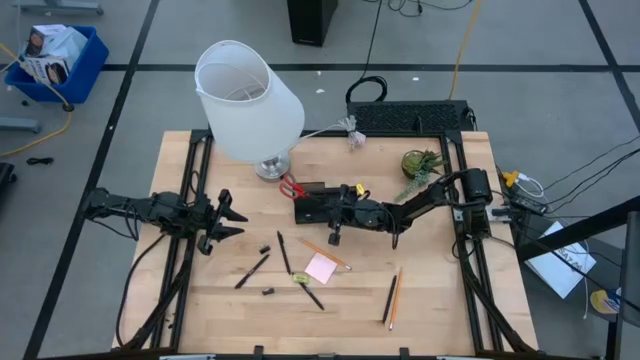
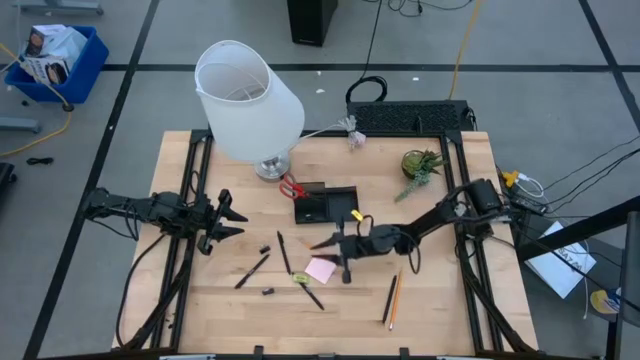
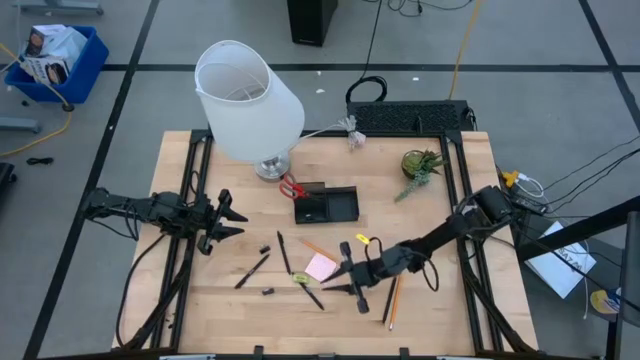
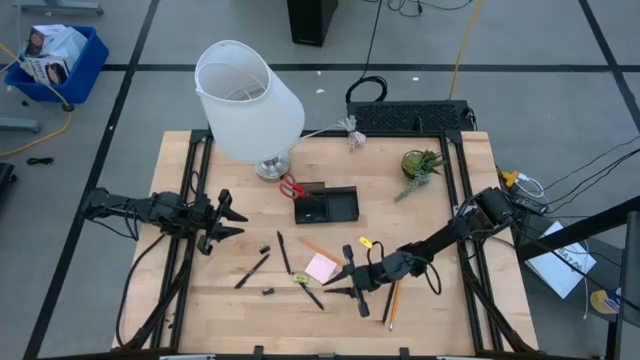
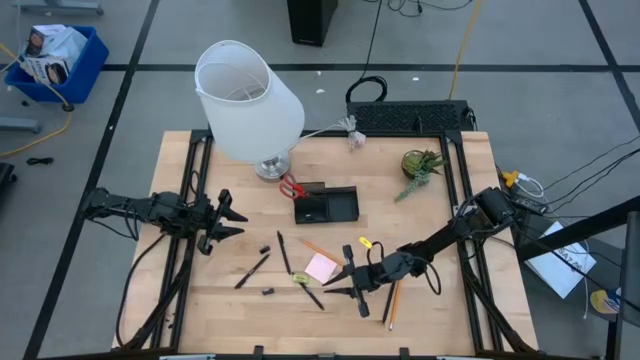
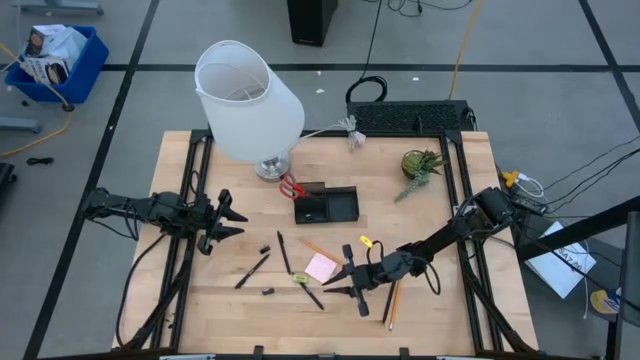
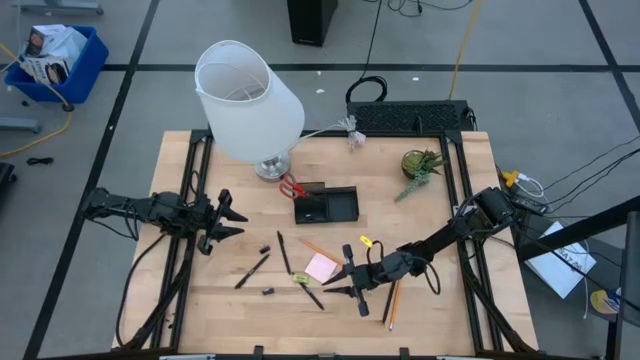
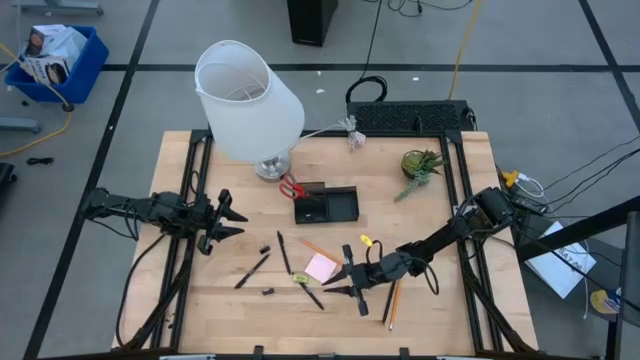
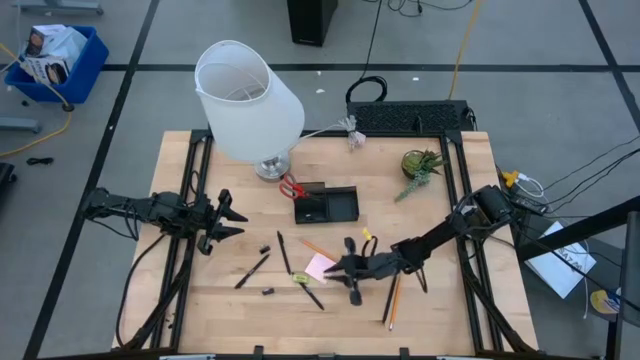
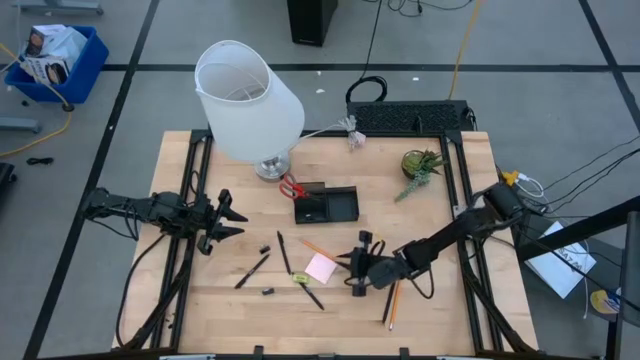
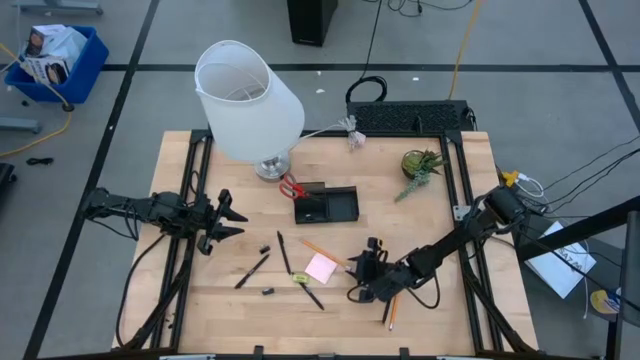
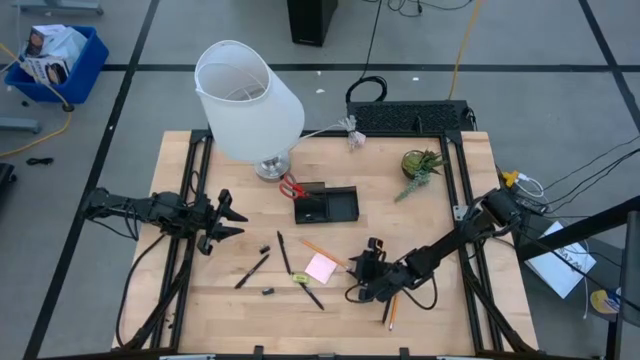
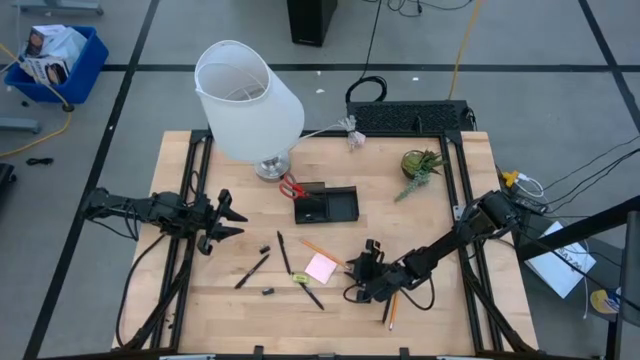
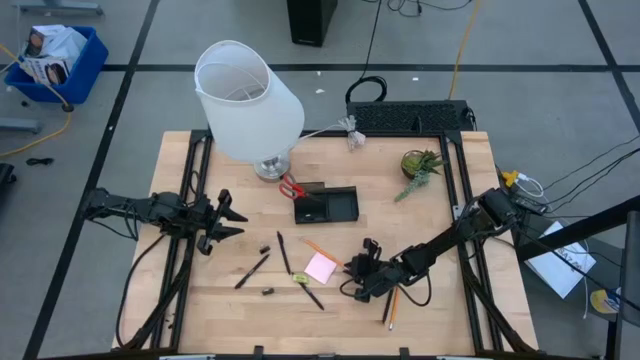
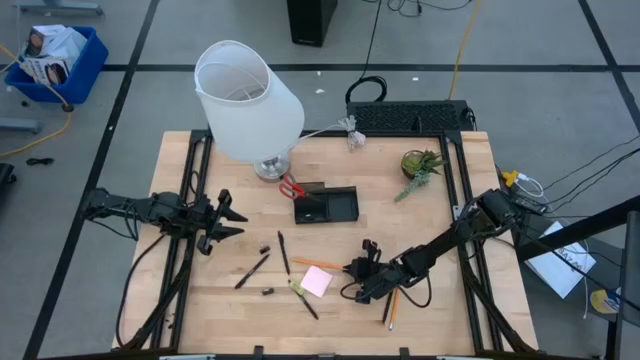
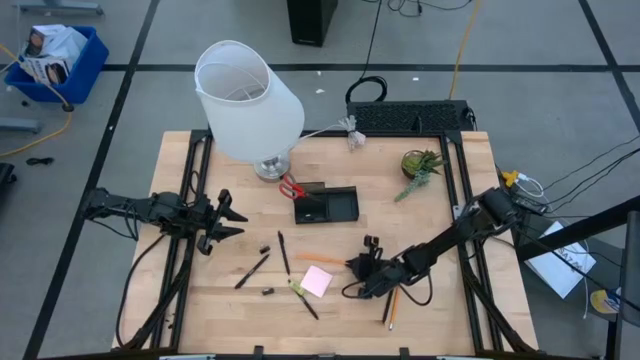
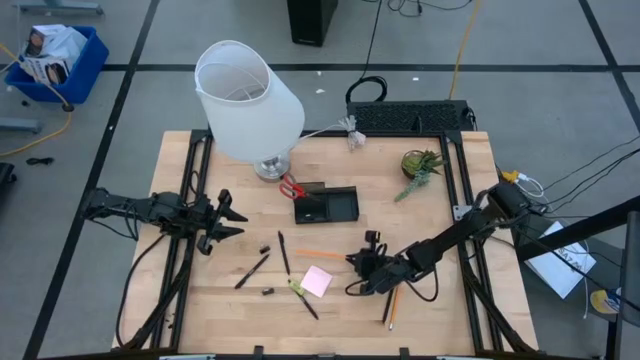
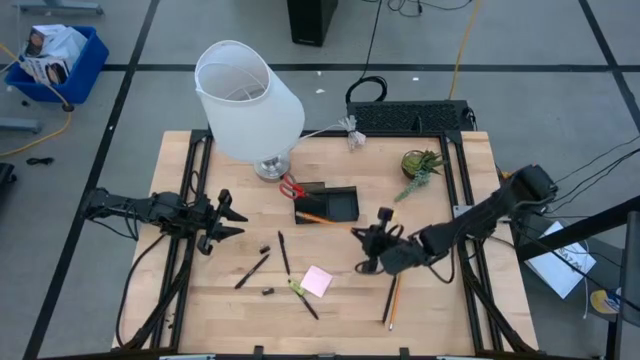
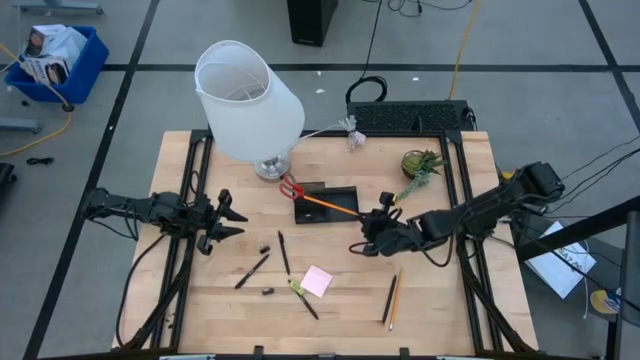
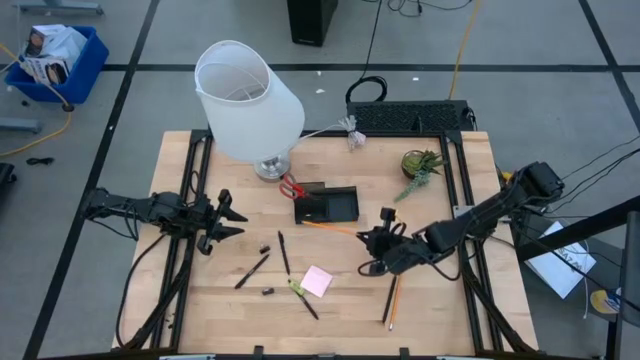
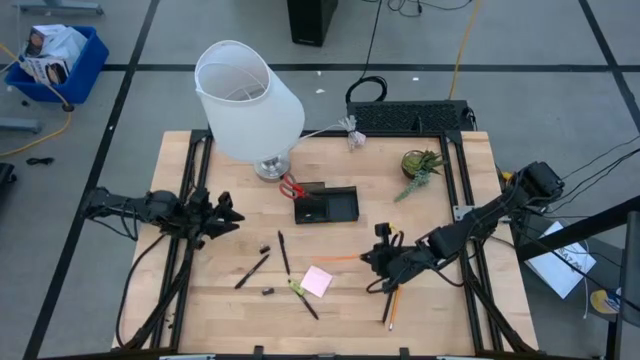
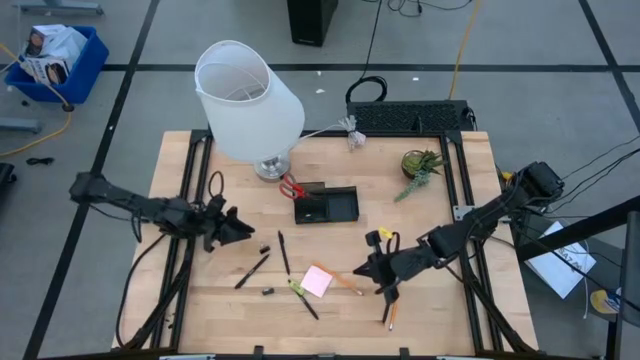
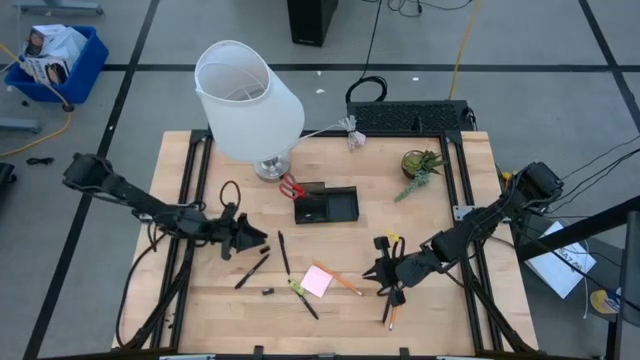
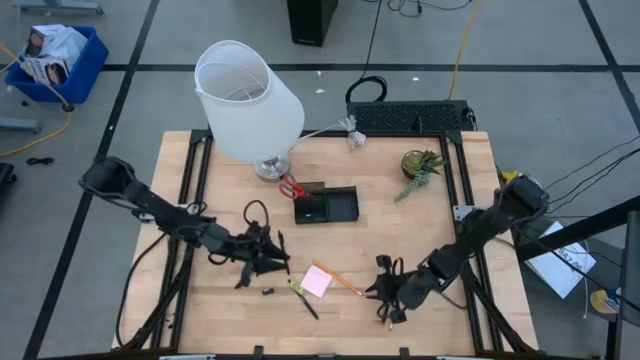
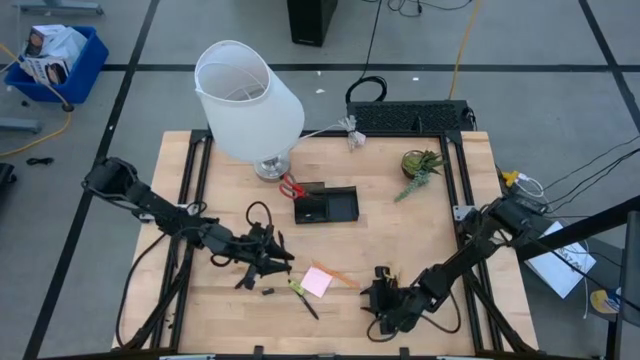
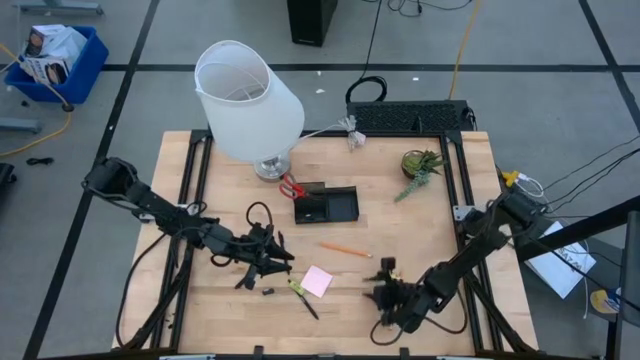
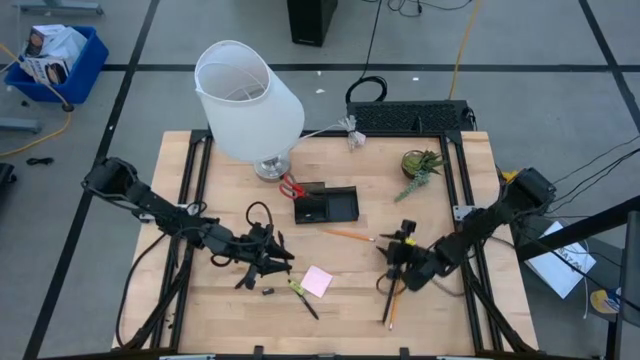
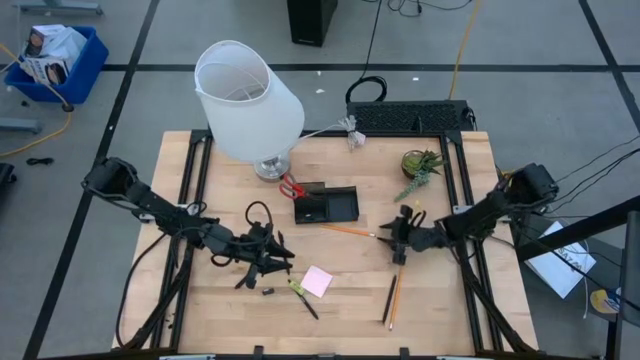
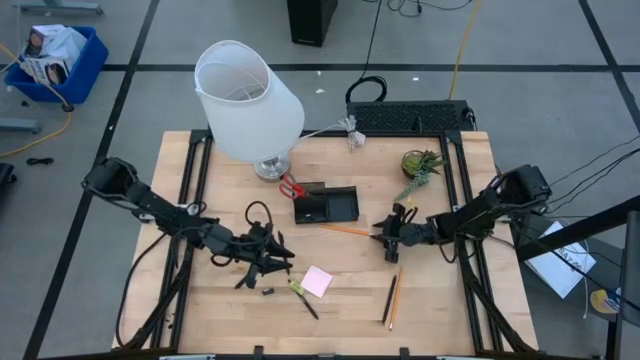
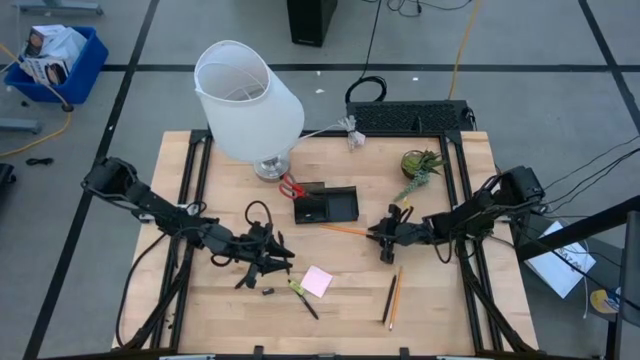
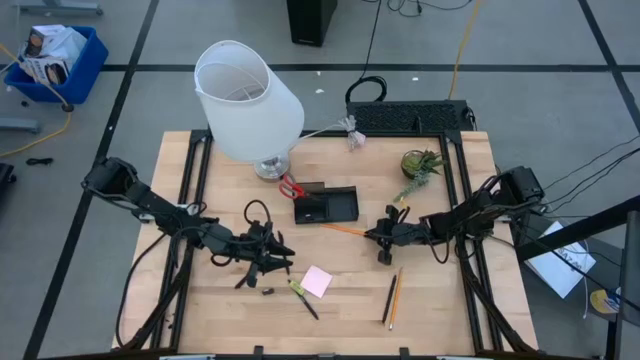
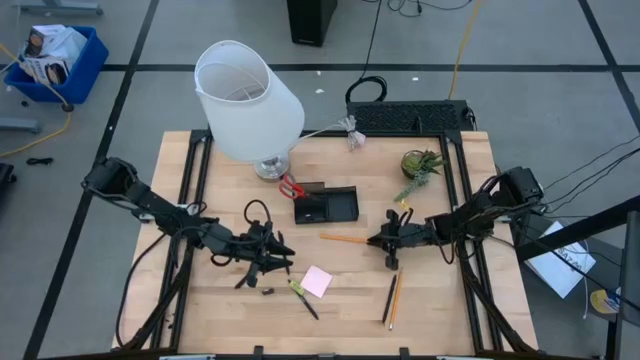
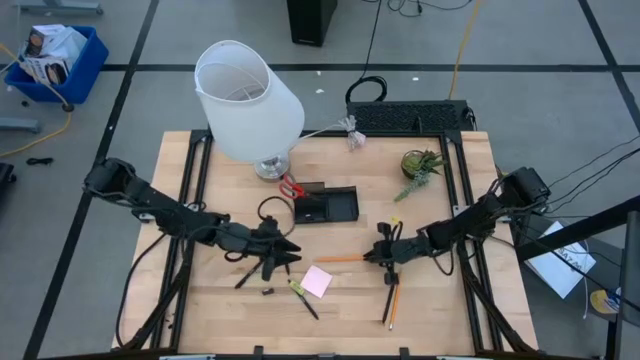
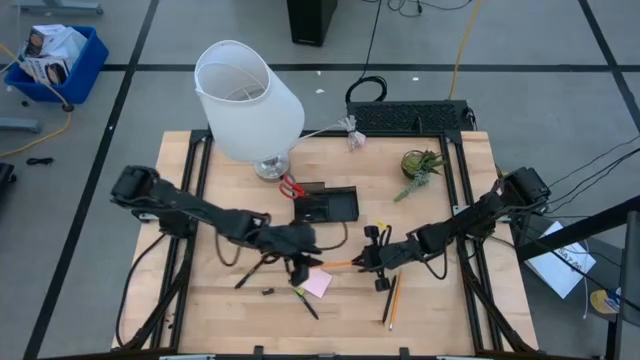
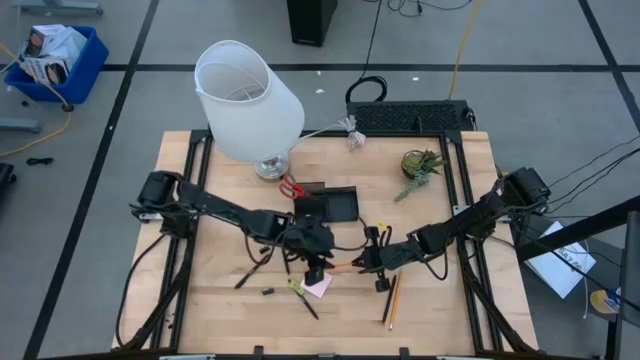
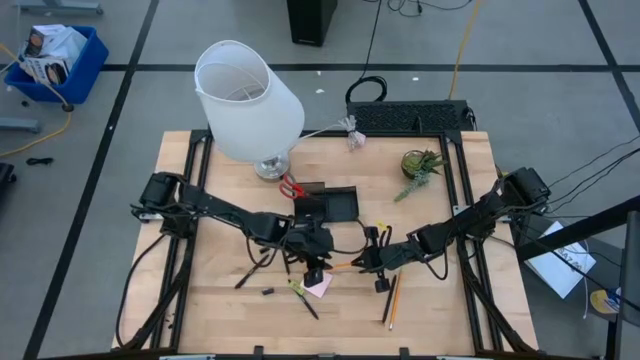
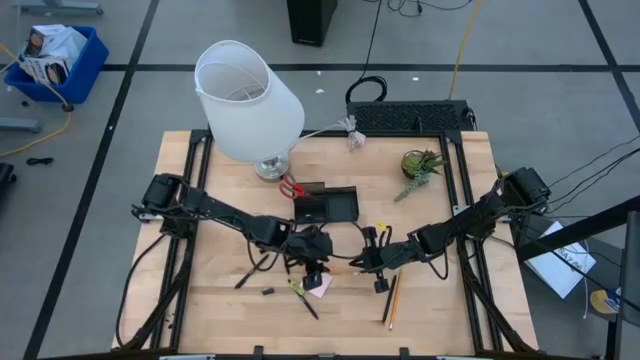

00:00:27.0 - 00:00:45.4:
Task: Pick and place office supplies into organizer
Put the left yellow pencil into the top left compartment of the desk organizer

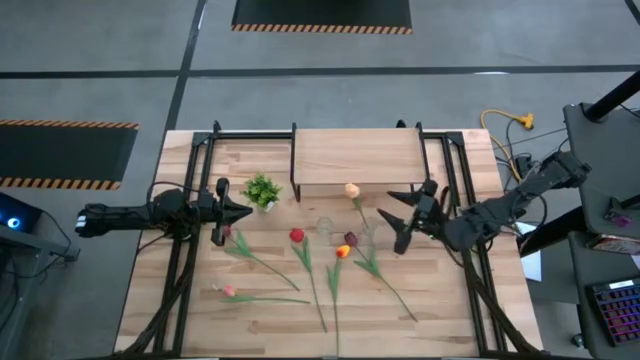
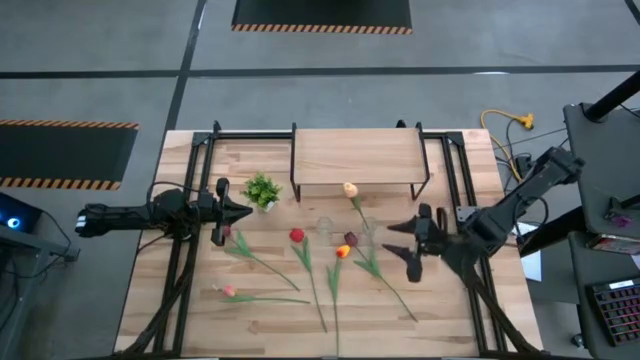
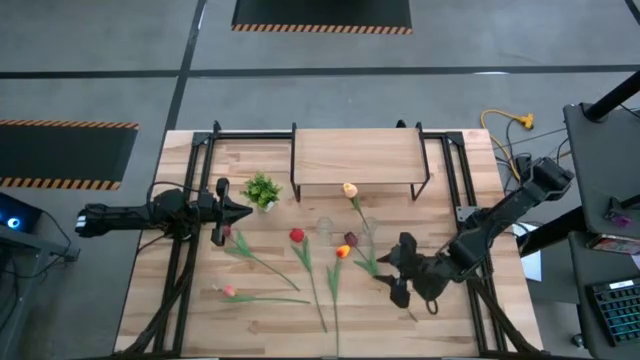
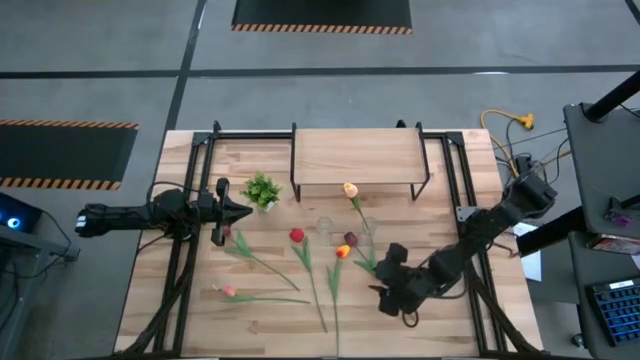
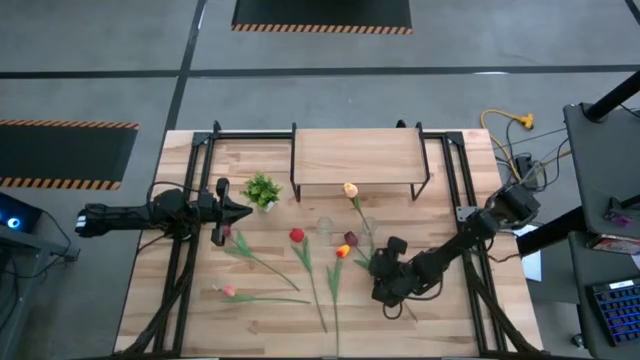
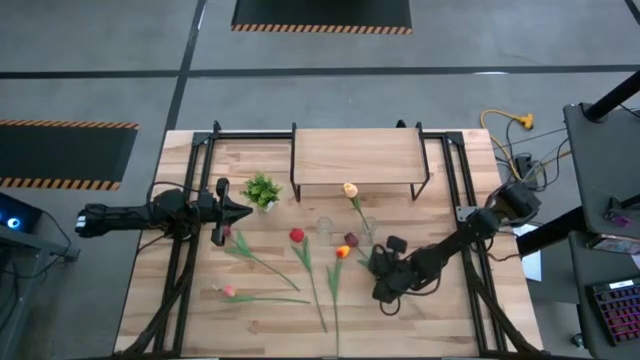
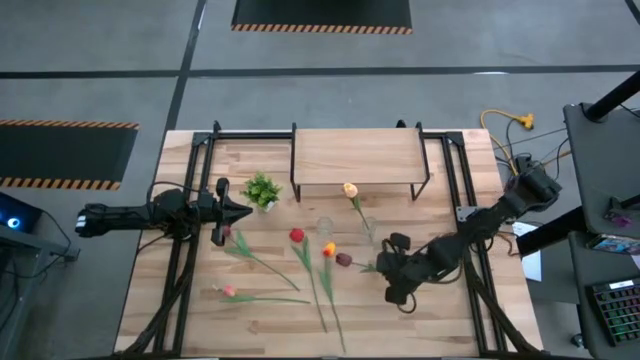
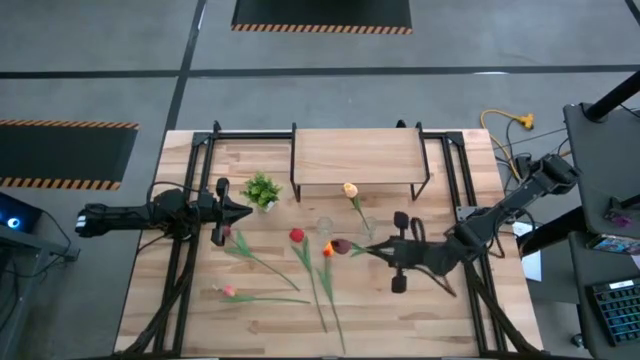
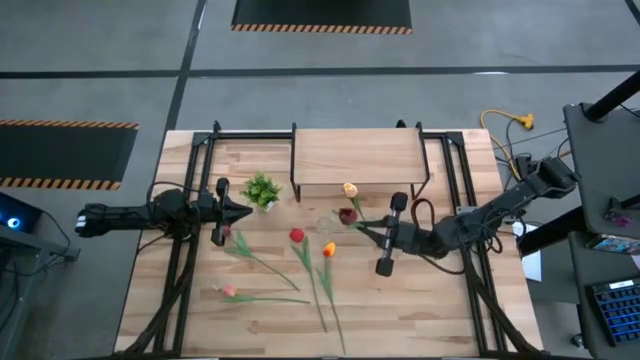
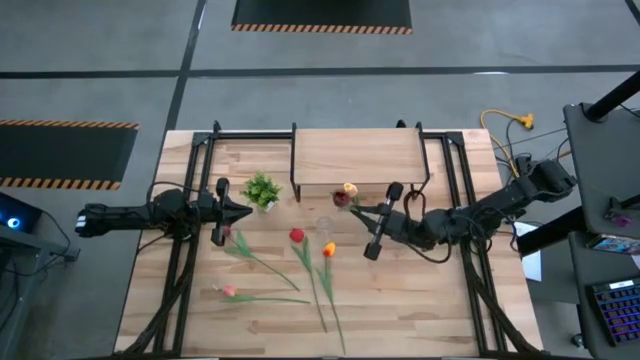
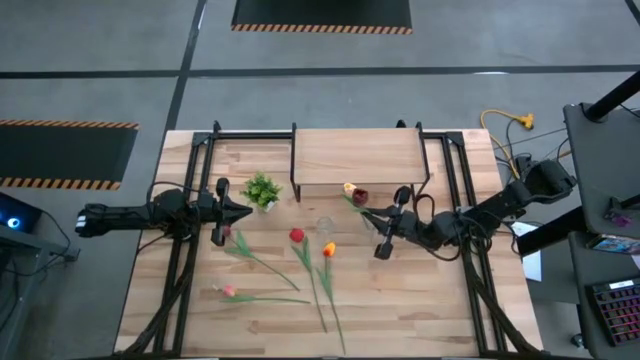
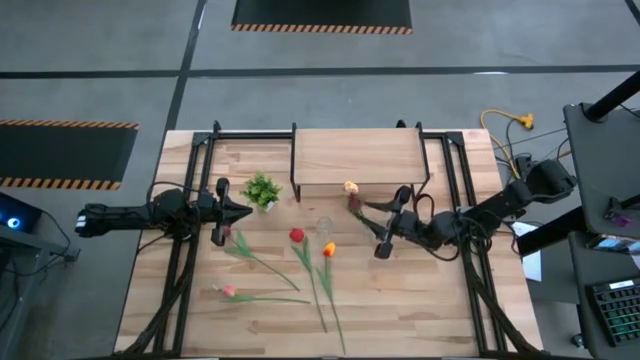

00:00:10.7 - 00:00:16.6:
Task: Pick and place flowers into a vace then onto a shelf
Put the right dark red tulip into the right transparent vase
